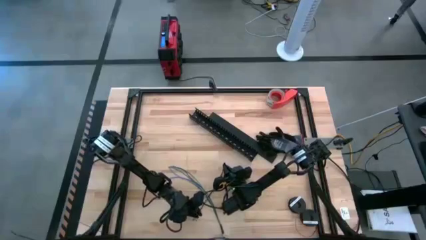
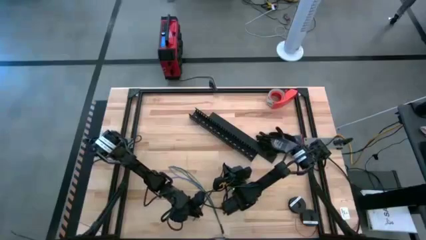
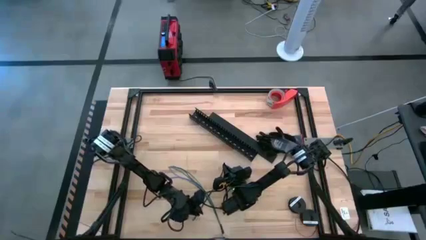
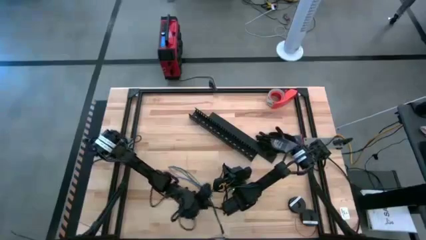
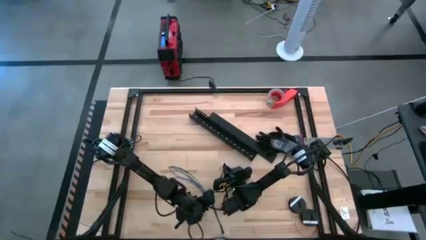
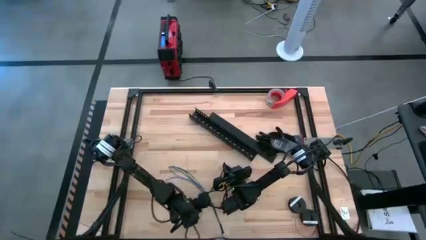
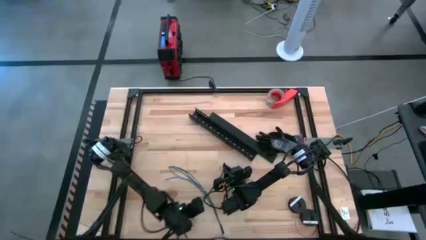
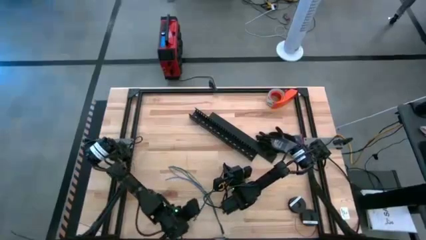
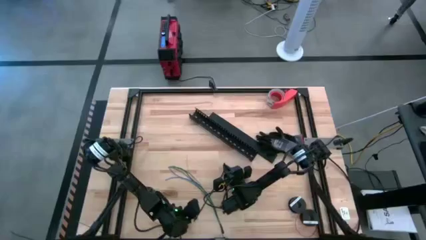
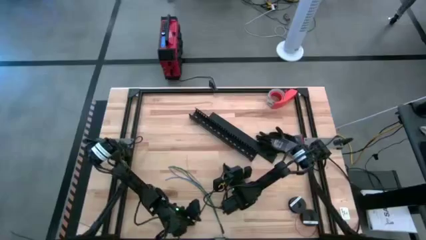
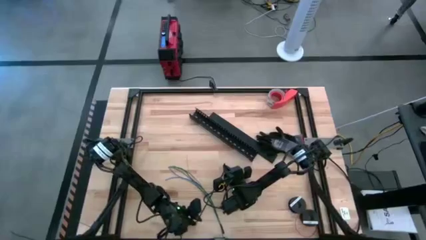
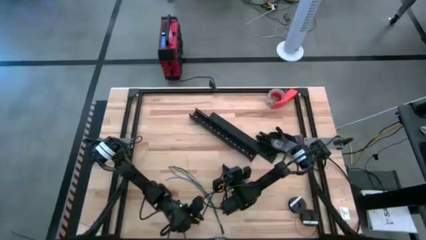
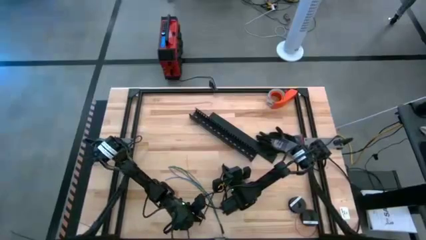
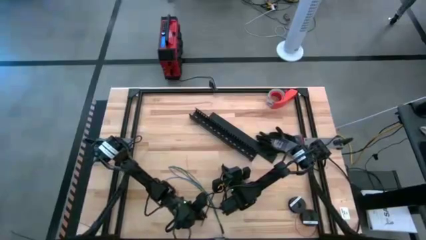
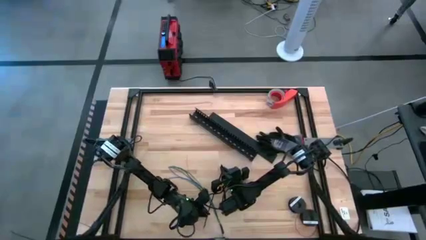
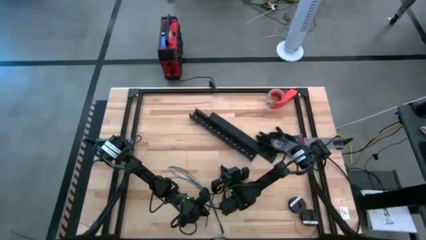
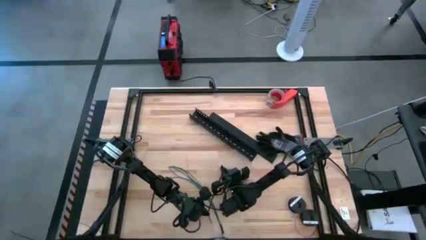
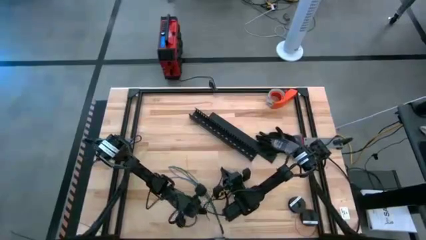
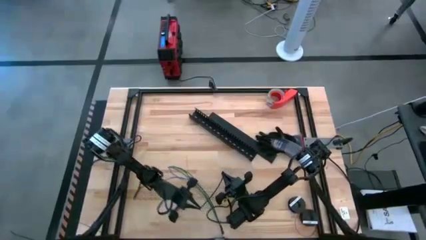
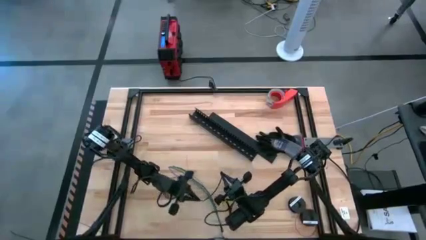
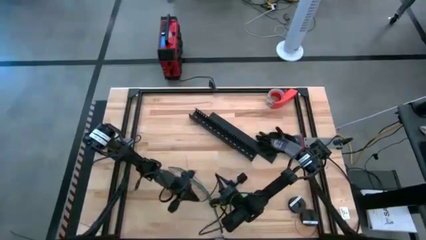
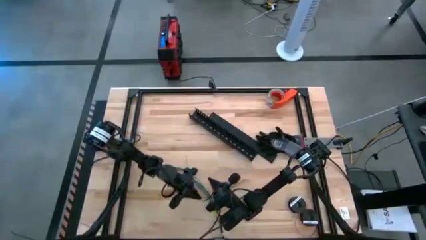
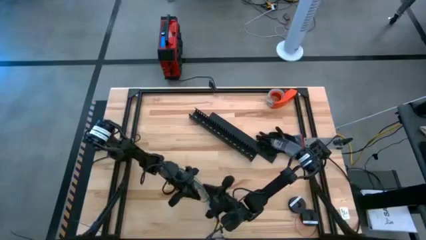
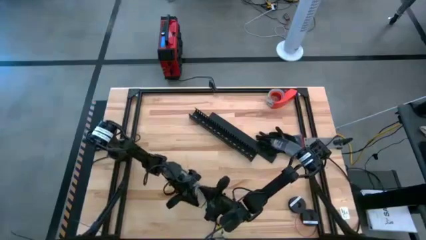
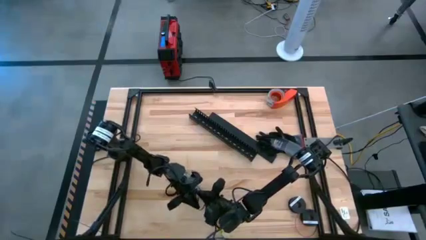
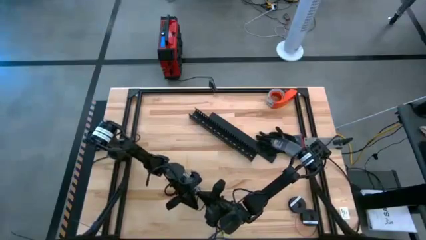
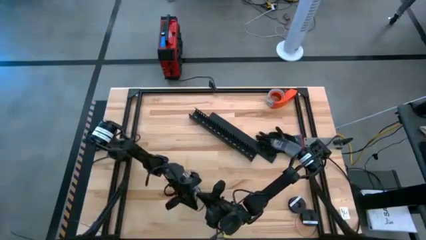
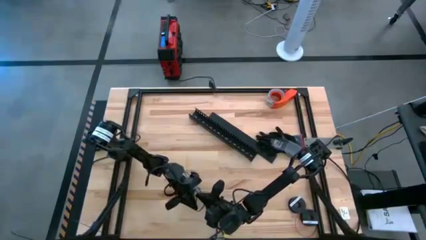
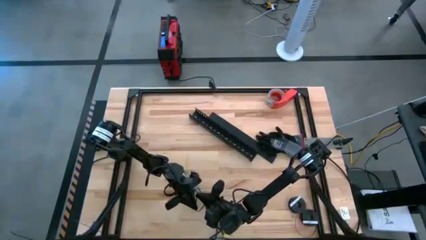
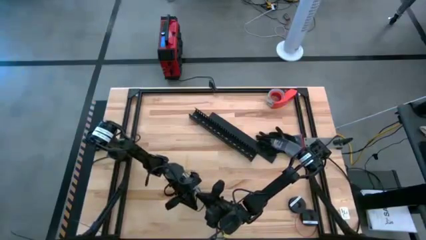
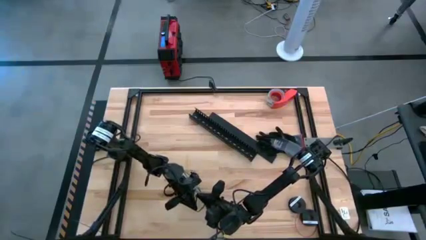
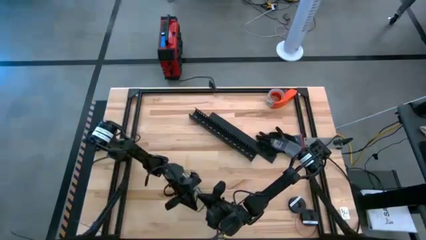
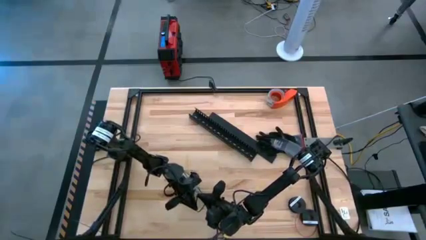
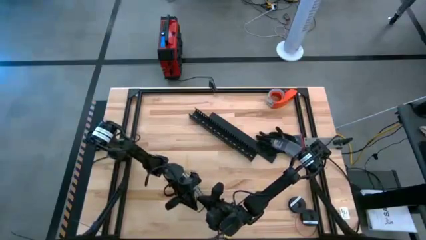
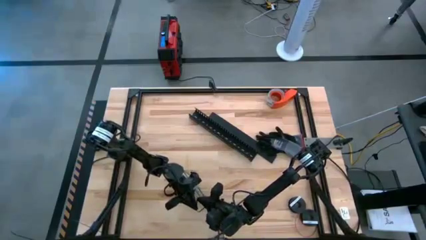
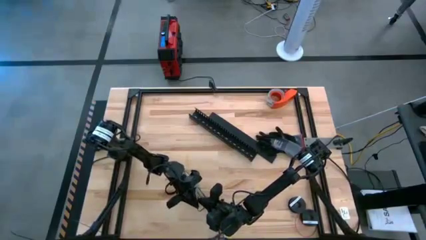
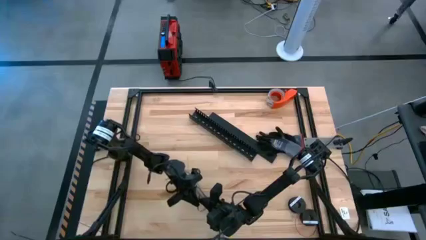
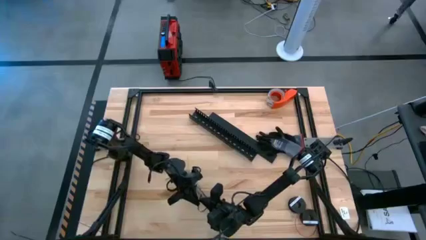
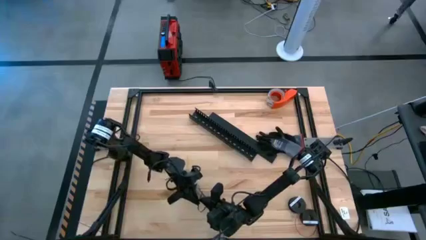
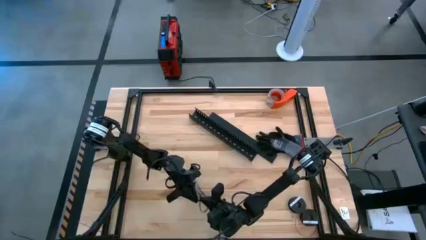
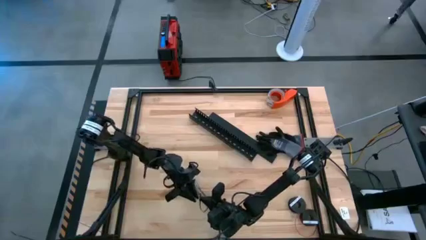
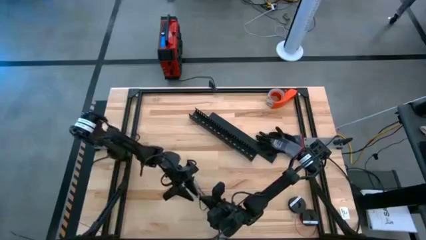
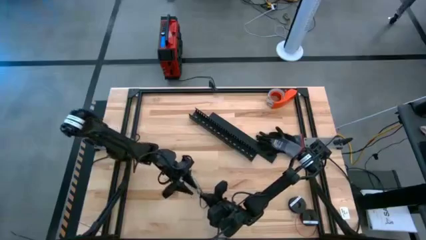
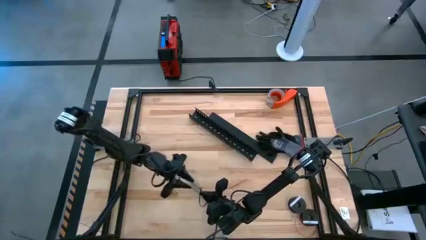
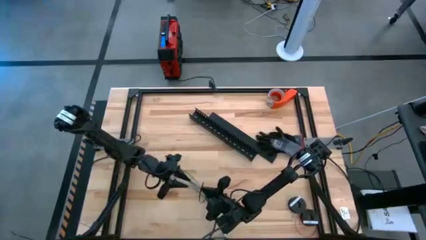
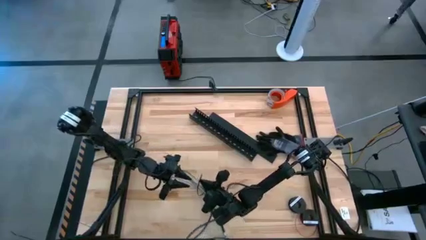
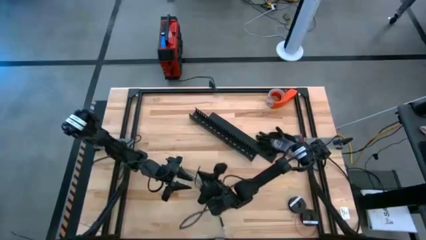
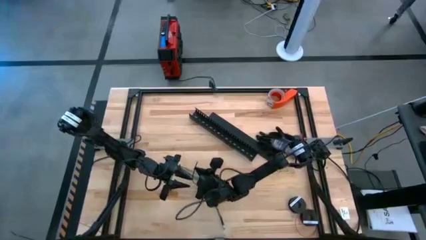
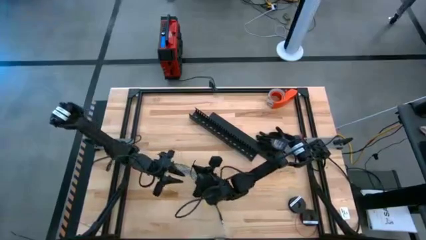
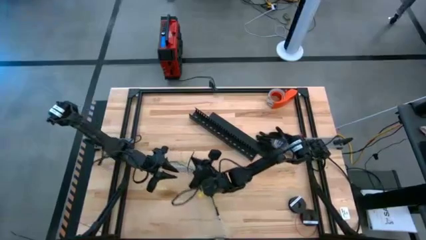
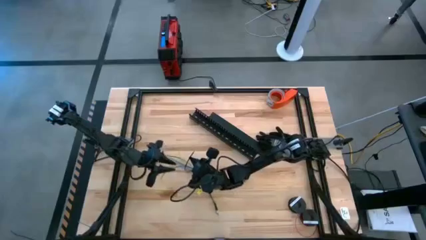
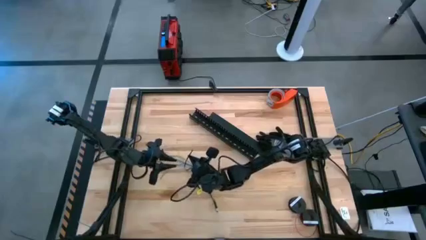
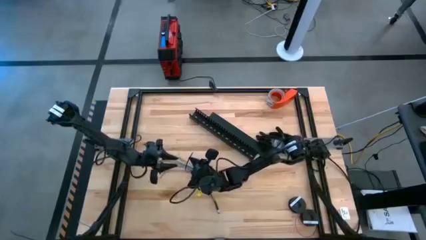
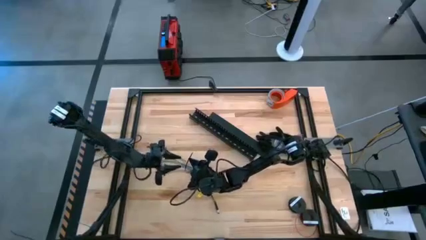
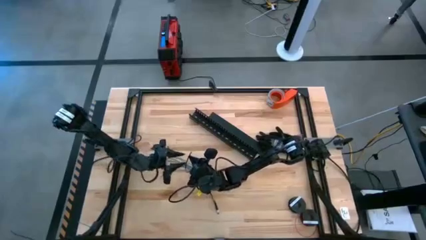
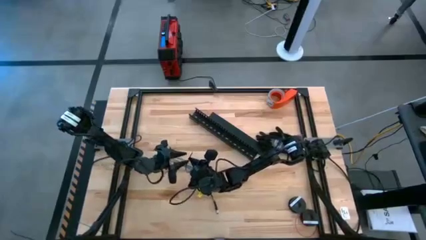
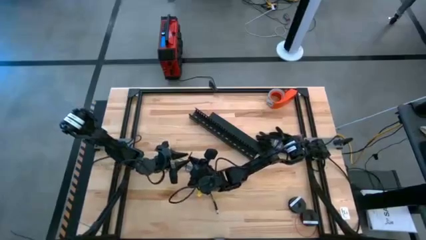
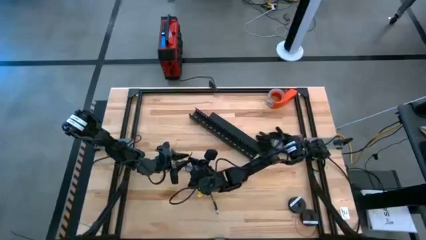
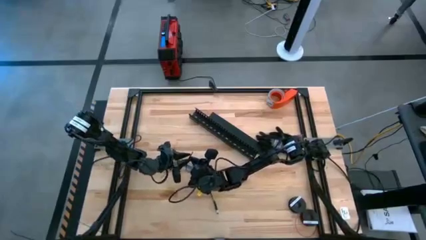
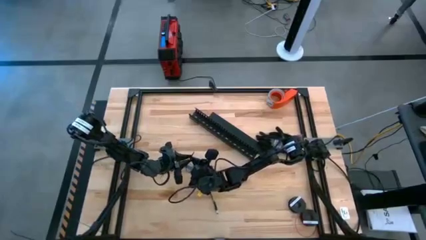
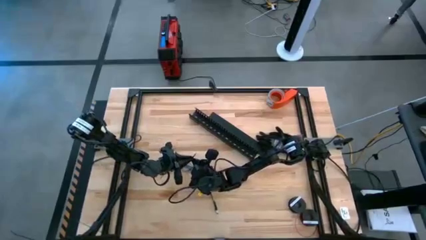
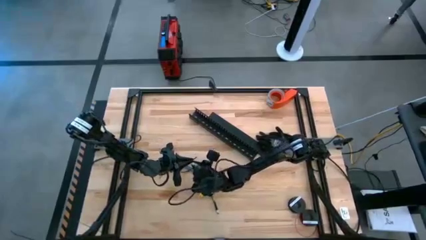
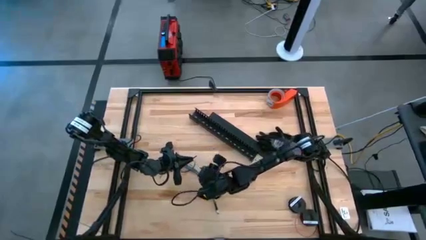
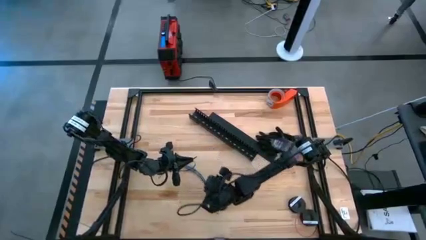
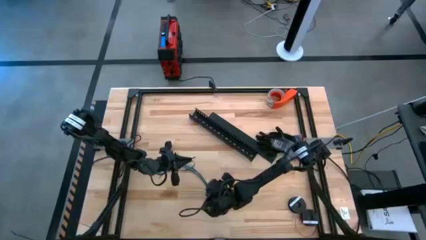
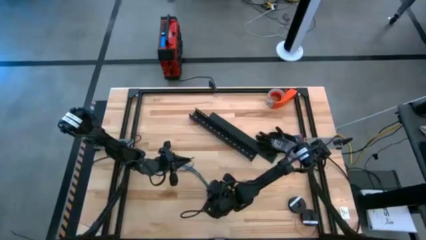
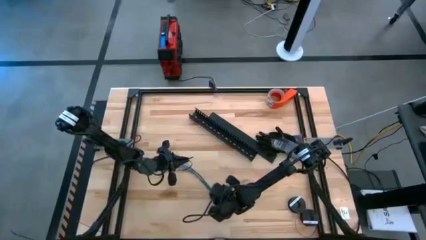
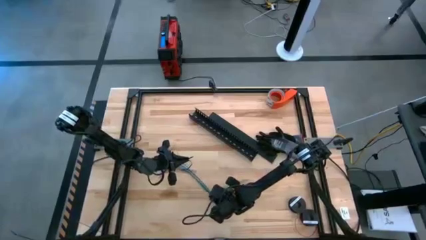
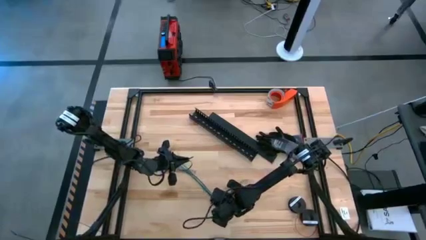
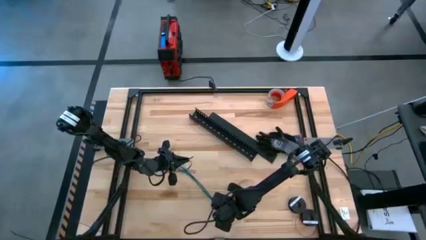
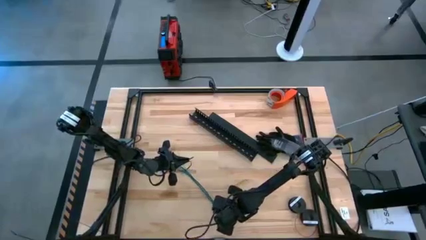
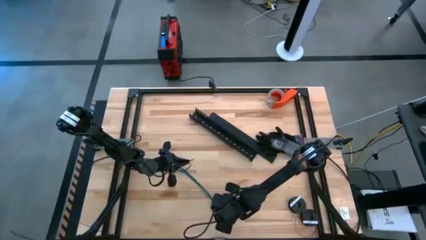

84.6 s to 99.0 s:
Task: Ziptie cables
Wrap the zip tie around the cable bundle

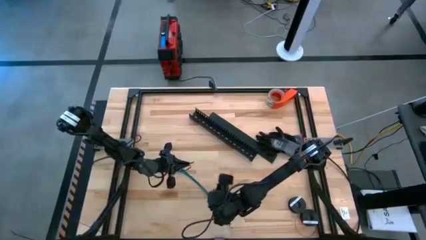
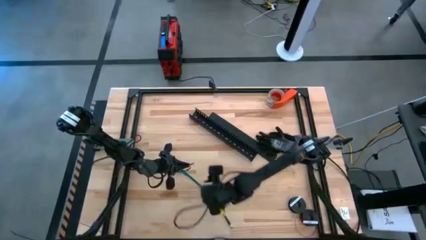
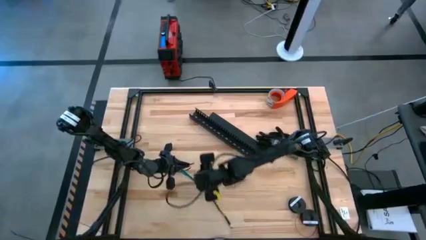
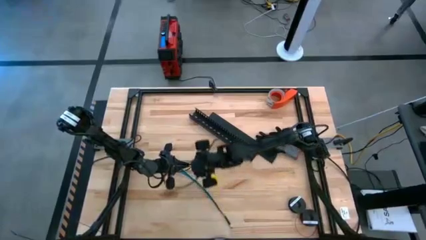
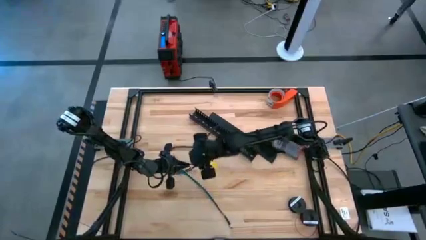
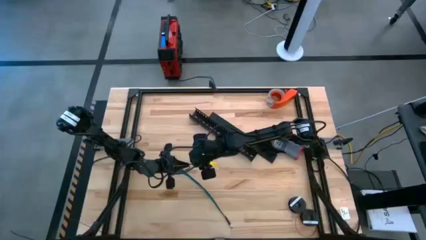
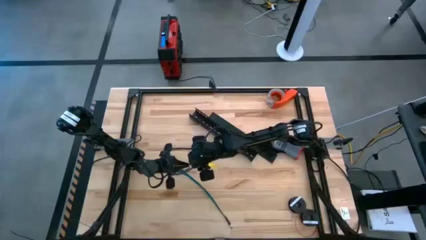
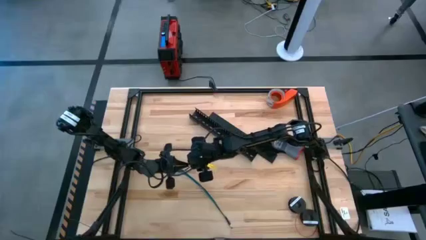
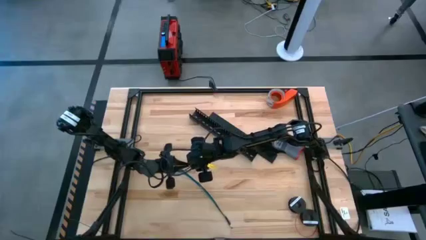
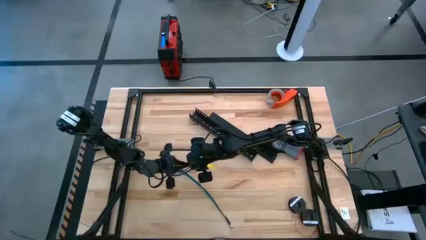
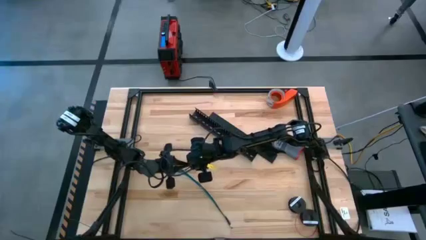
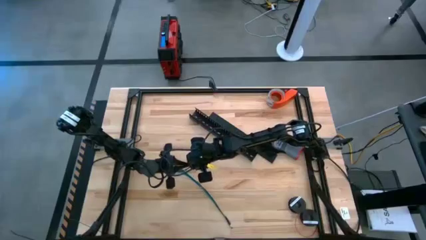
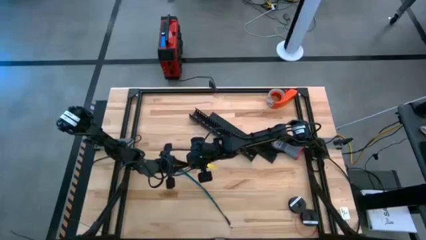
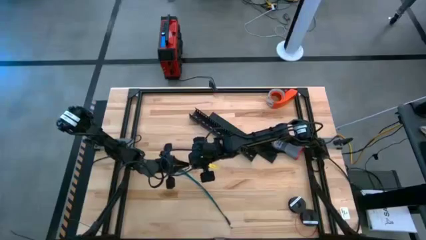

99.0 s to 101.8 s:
Wrap the zip tie around the cable bundle
